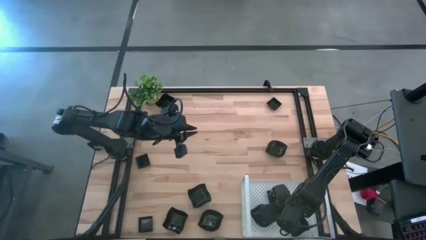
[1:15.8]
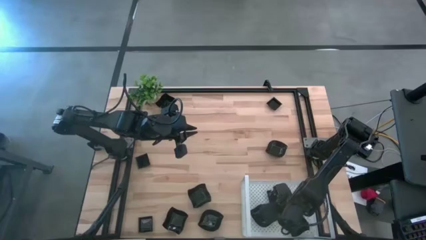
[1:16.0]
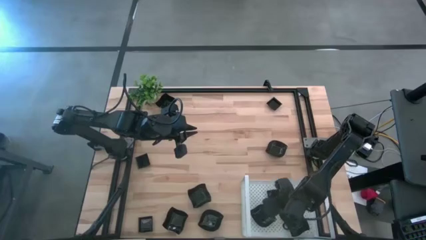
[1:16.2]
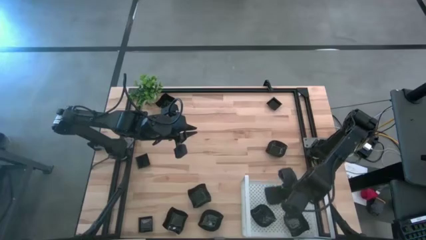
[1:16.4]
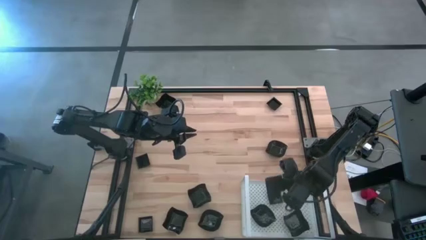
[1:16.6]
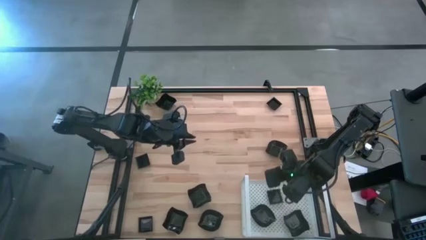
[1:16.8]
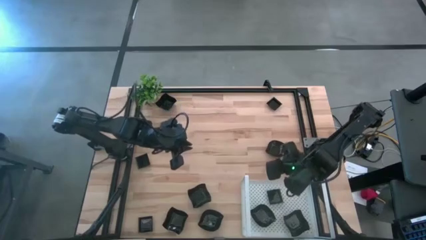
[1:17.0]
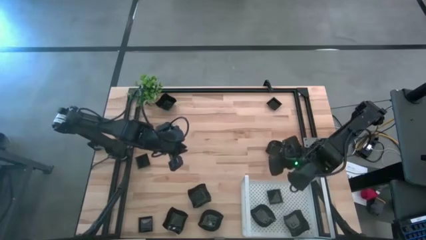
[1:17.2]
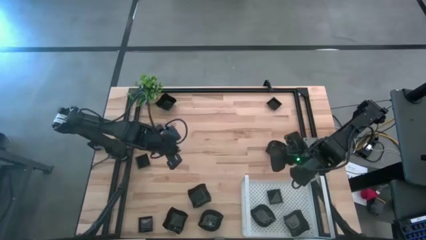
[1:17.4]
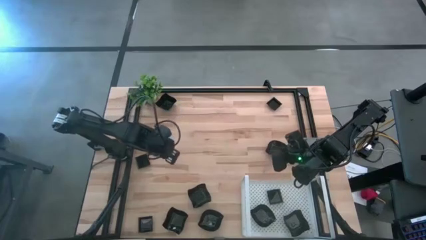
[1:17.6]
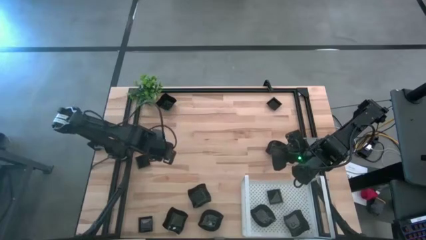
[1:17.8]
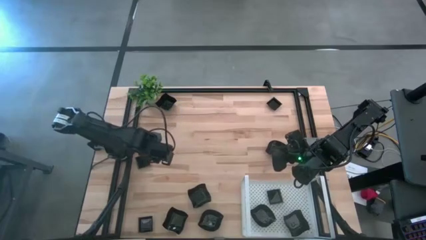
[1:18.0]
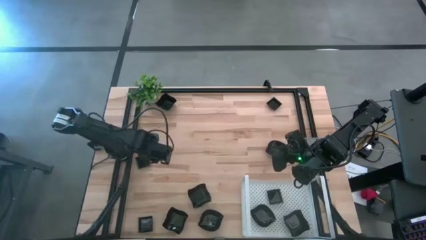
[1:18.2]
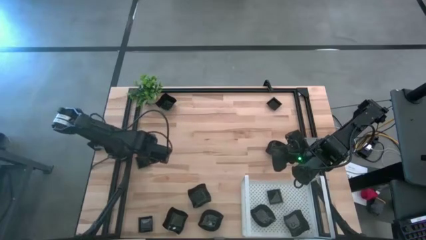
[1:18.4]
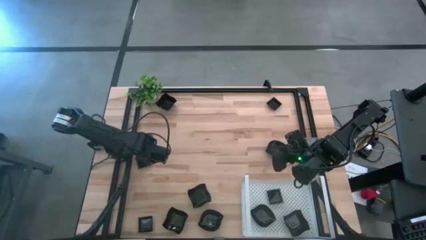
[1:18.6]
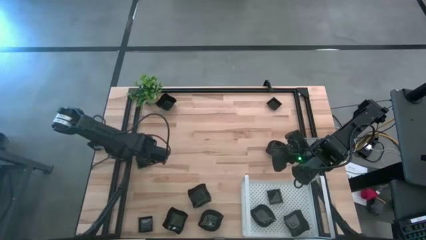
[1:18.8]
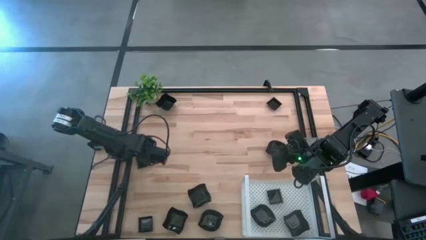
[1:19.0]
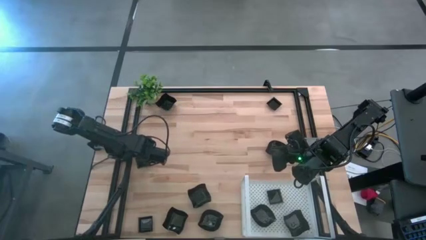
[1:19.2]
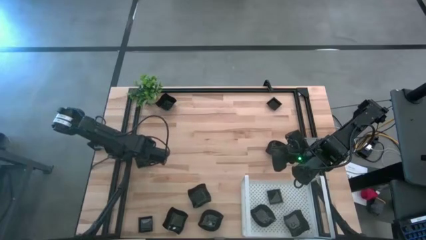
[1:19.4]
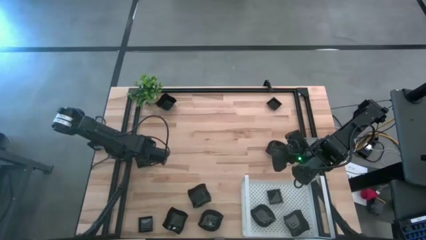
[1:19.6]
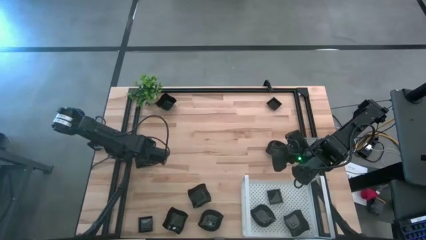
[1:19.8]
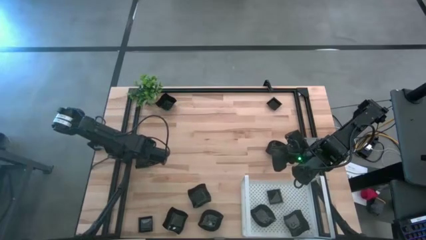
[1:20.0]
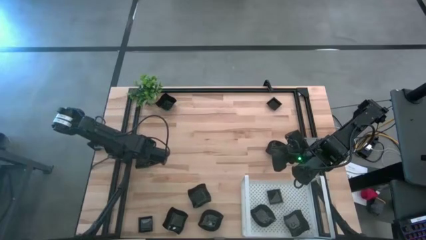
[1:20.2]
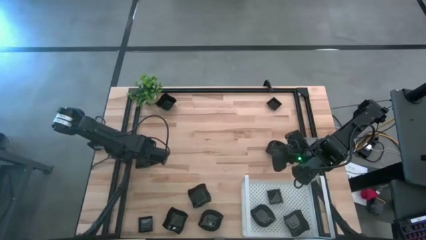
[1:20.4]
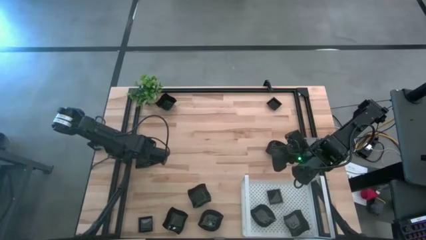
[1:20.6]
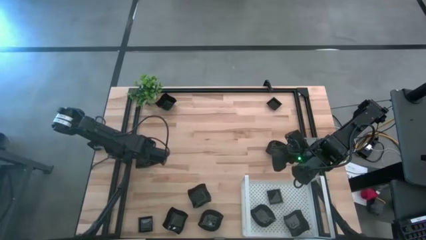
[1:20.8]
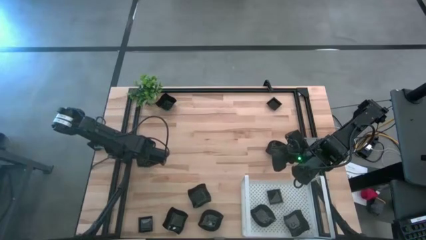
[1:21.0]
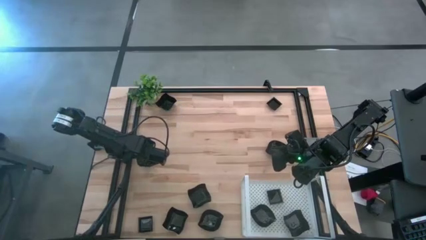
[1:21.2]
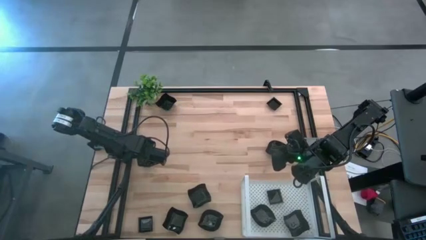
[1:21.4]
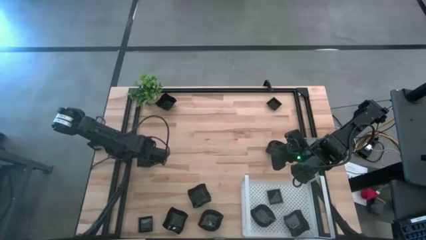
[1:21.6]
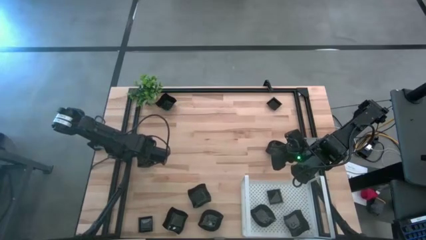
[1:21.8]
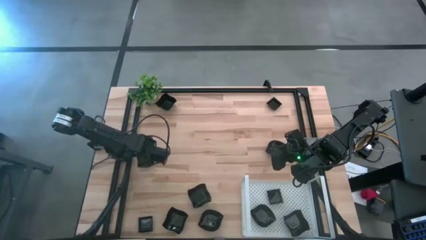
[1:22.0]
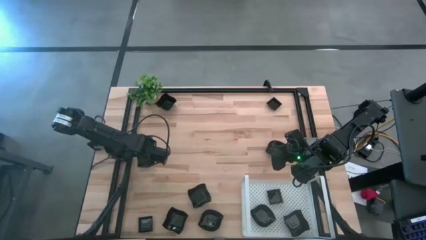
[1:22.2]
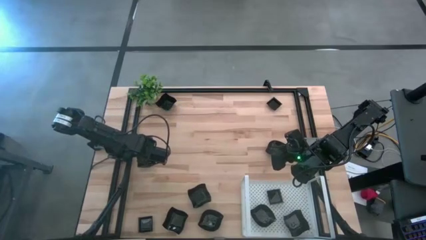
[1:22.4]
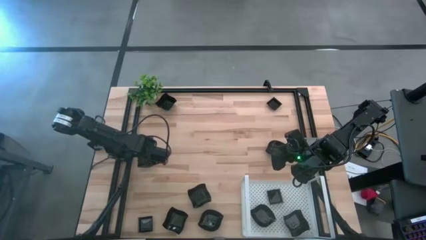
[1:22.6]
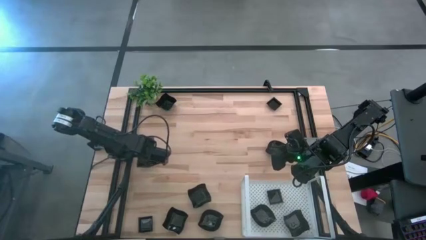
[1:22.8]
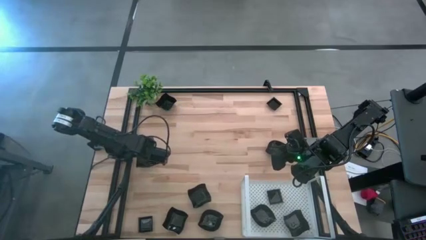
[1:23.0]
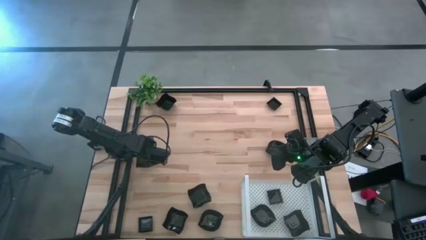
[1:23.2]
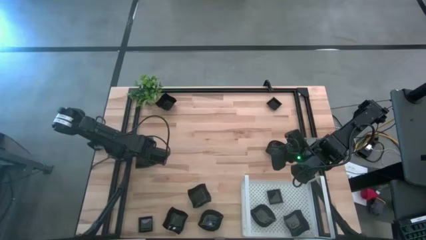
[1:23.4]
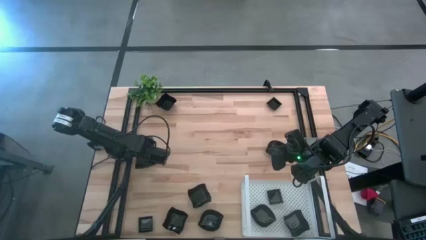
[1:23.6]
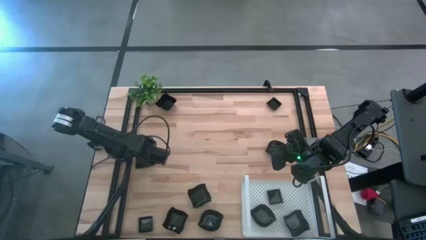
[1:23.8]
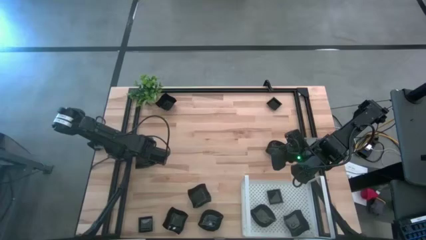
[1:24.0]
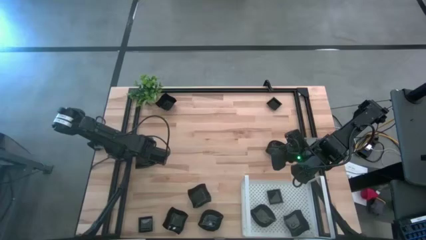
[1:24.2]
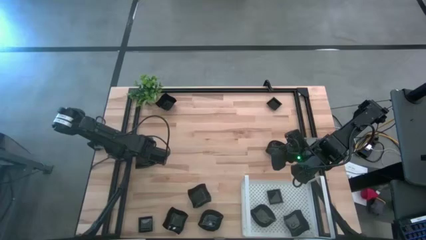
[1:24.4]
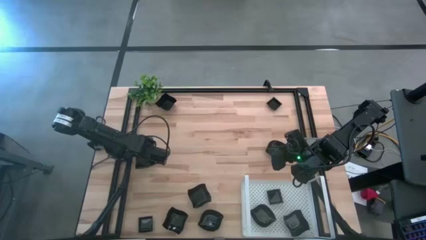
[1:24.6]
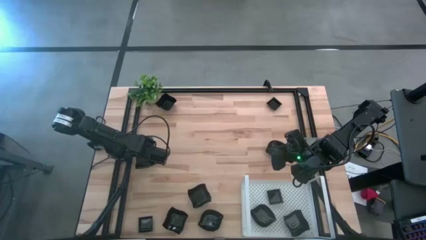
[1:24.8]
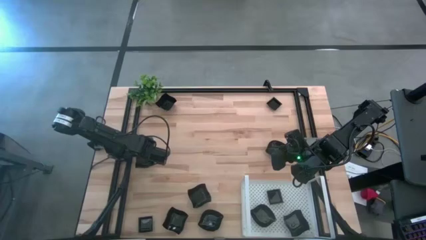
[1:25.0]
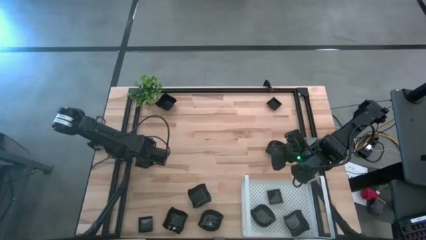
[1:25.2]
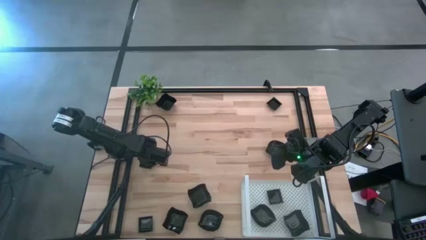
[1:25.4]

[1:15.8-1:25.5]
Task: Pick & Place Mini shaped plates
Stack the square plate on top of the other square plate on the shelf
